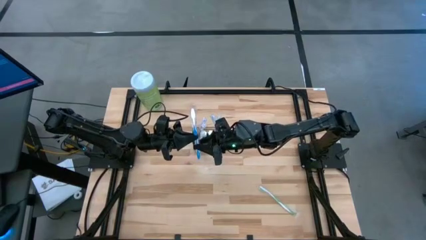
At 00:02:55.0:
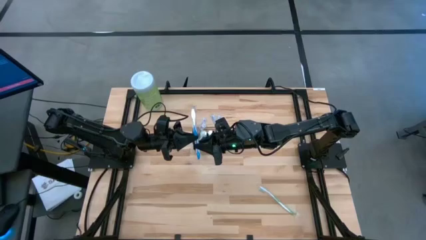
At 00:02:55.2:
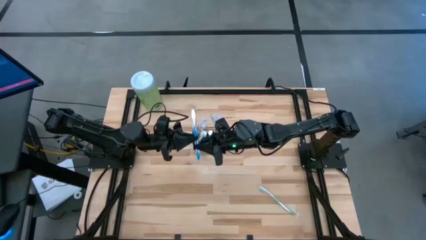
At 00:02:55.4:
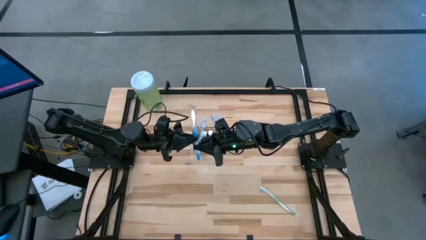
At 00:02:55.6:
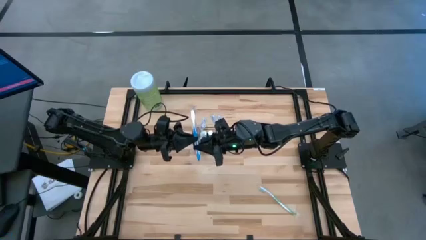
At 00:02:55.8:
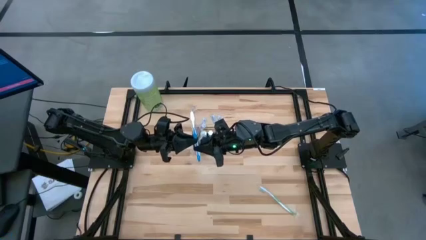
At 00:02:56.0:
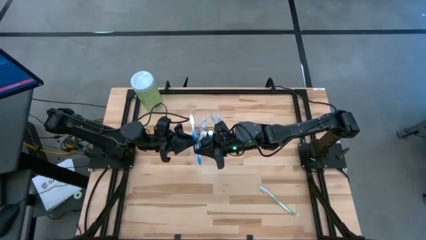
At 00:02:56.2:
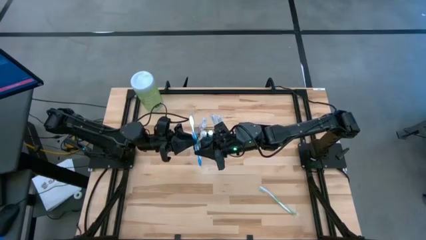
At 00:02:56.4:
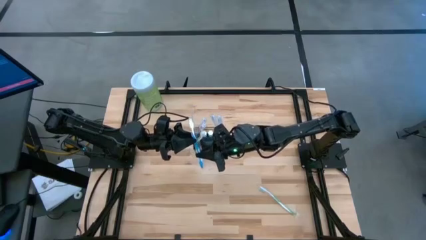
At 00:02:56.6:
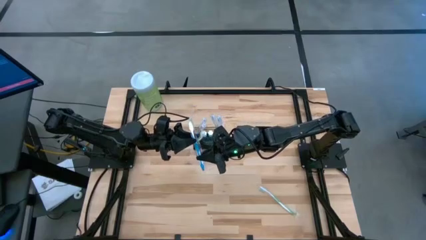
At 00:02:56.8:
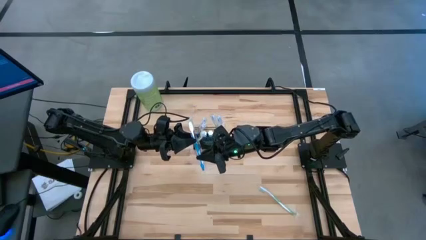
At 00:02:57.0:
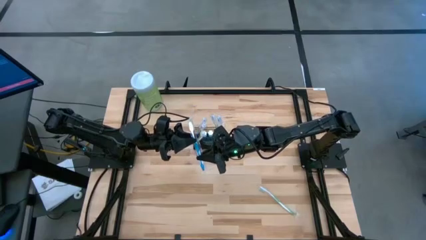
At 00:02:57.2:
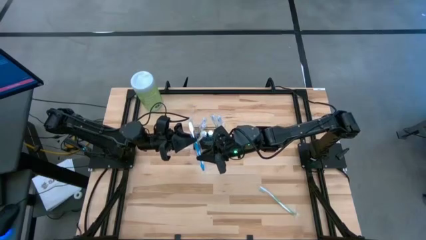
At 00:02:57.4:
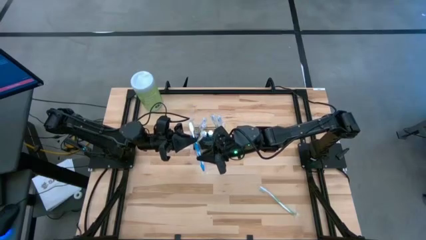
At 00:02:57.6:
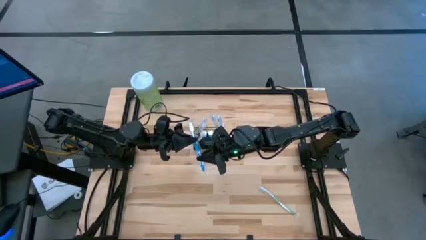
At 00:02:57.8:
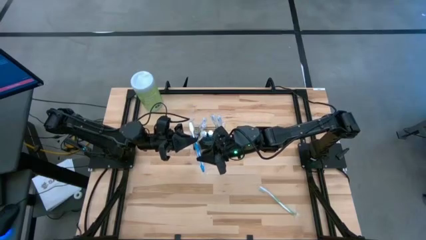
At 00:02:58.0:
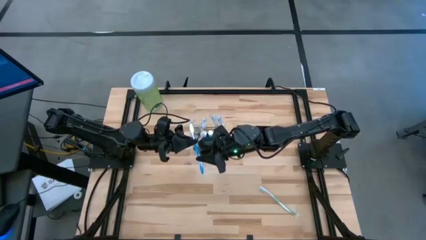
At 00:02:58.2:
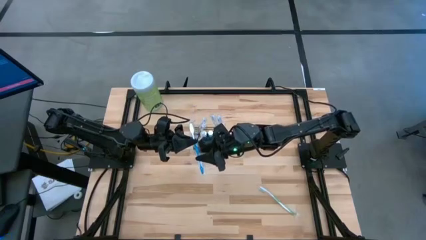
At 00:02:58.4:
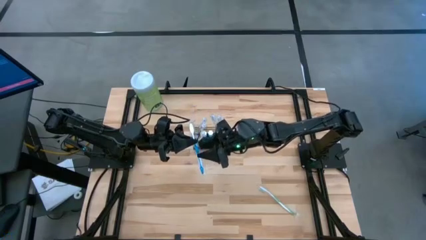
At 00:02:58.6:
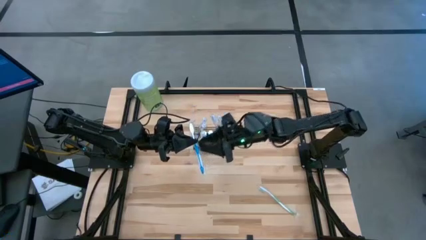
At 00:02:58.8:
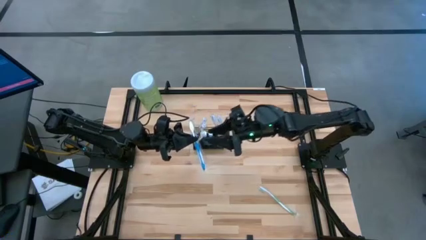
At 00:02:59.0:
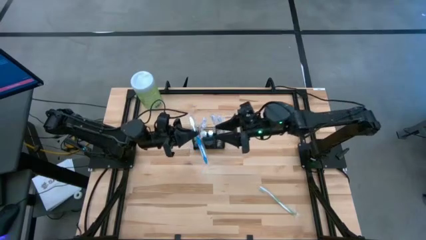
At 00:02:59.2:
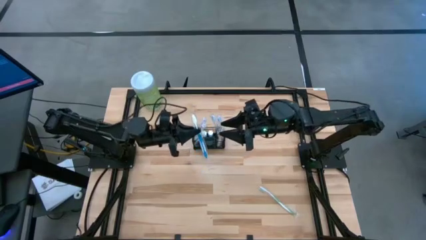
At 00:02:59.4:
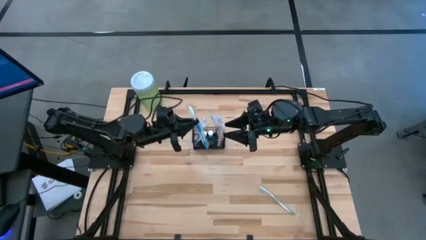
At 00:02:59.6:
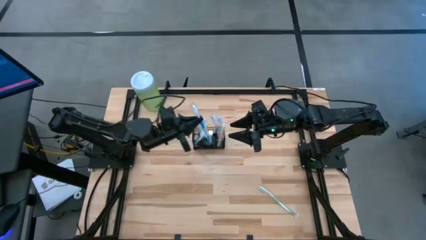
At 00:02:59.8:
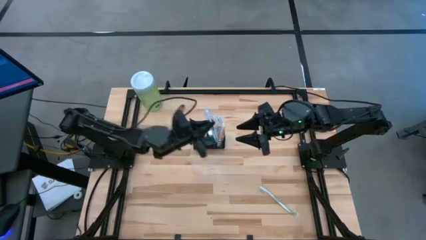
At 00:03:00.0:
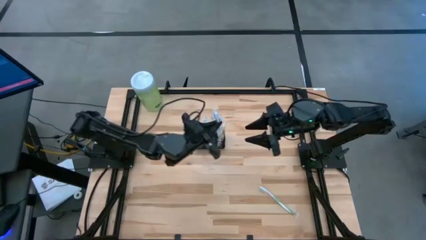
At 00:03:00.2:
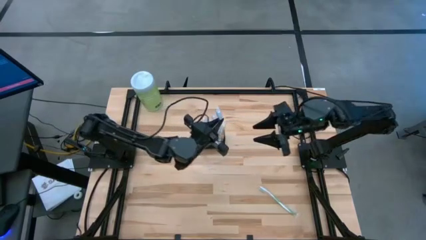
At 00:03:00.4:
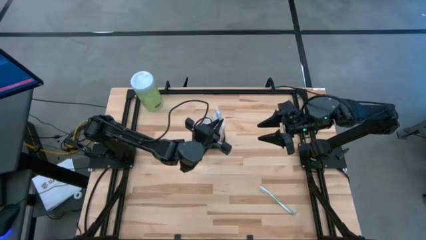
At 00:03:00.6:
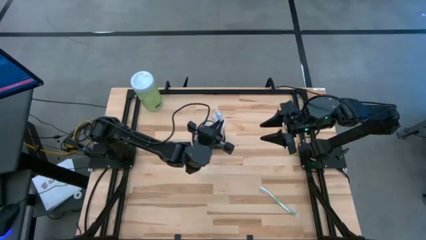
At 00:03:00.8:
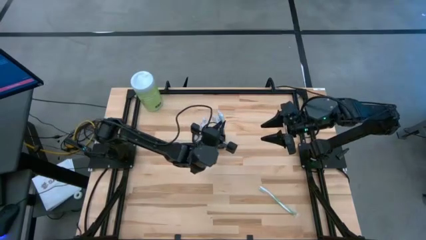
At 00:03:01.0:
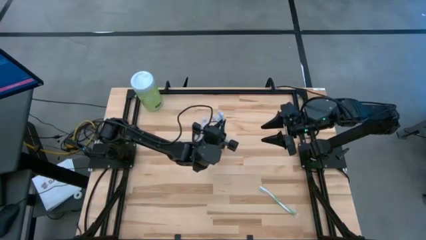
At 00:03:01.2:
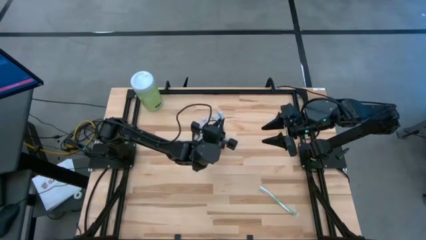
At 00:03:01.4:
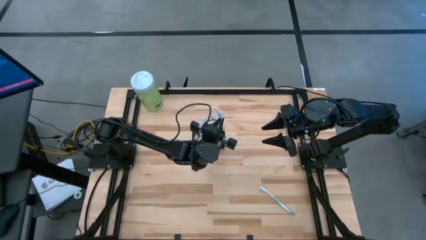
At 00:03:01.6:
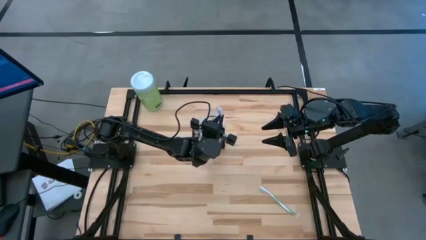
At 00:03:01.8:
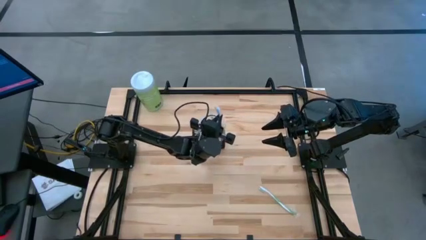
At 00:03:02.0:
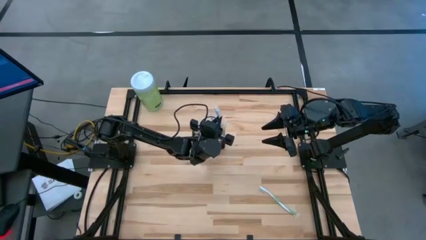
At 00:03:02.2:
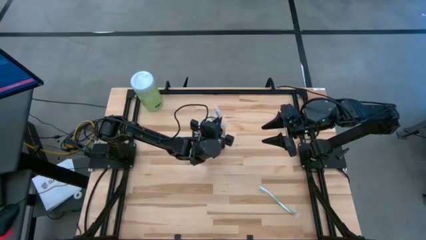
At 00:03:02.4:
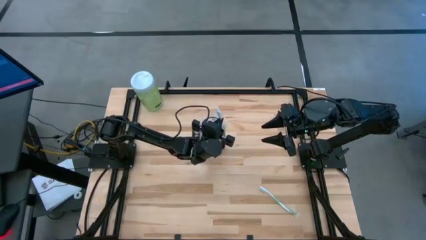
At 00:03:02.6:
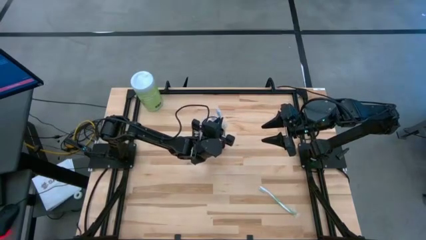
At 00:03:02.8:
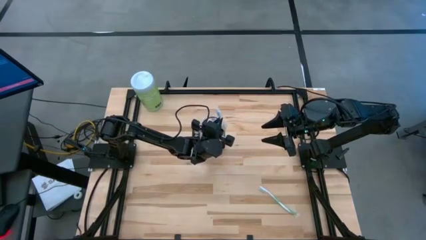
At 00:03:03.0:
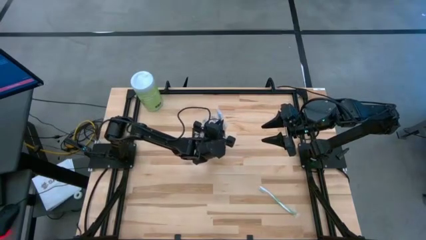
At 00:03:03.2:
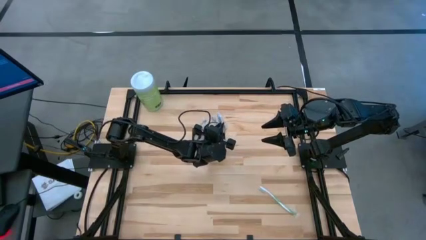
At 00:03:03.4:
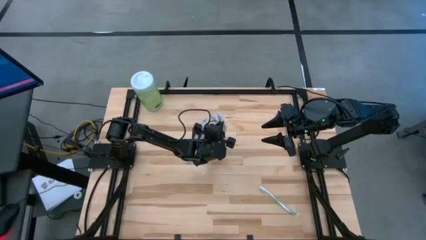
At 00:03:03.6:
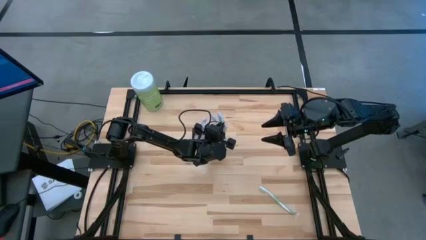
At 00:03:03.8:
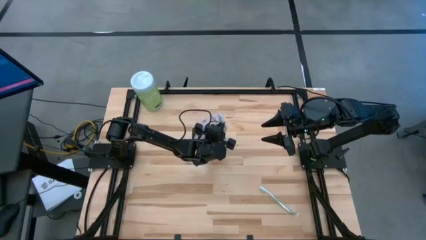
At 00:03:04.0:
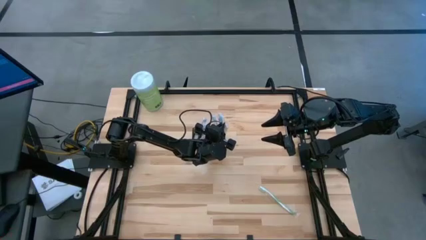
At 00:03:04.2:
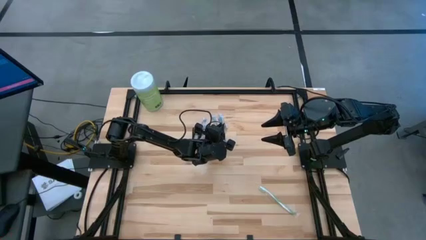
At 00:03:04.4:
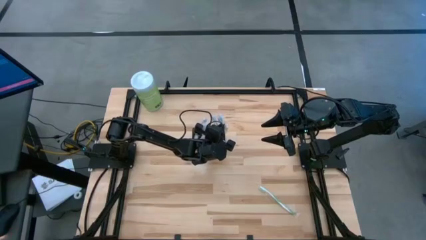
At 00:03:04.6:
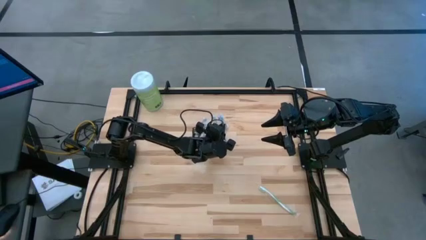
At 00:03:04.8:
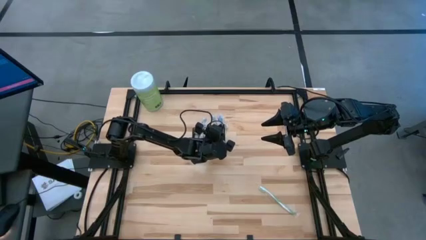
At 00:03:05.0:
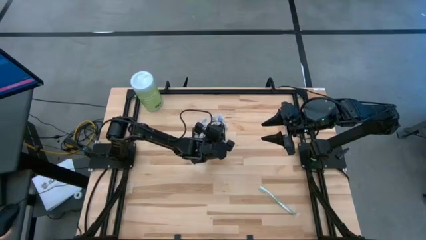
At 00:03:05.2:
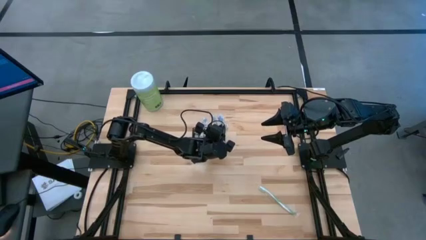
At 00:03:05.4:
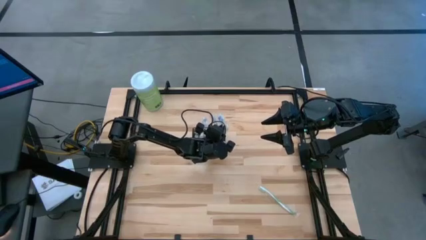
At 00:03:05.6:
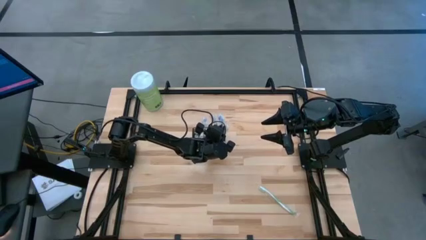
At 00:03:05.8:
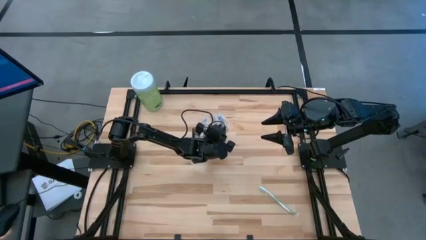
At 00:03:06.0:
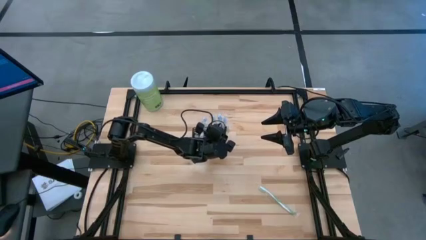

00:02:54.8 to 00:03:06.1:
Task: Pick & Place toothbrushing station
Put the blue toothbrush into the black mesh organizer

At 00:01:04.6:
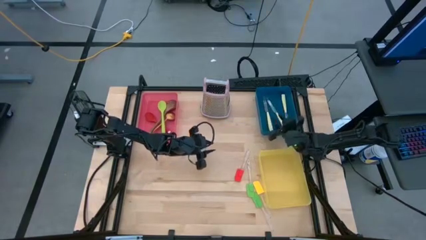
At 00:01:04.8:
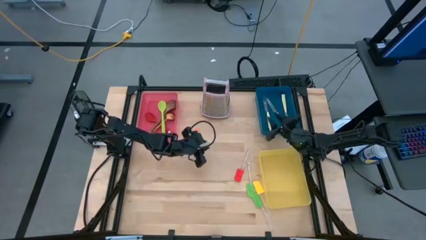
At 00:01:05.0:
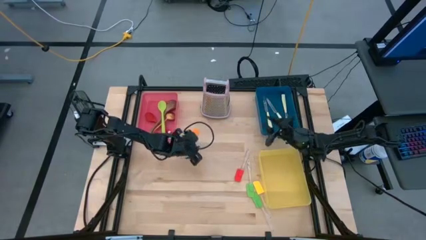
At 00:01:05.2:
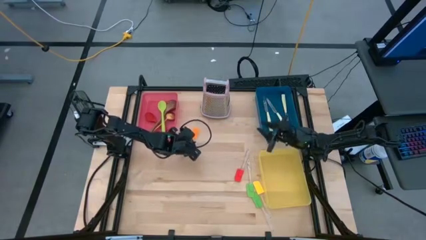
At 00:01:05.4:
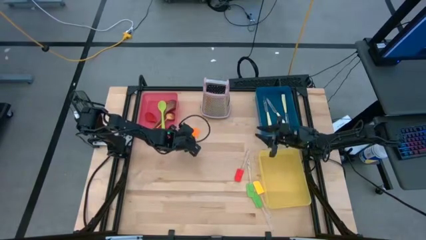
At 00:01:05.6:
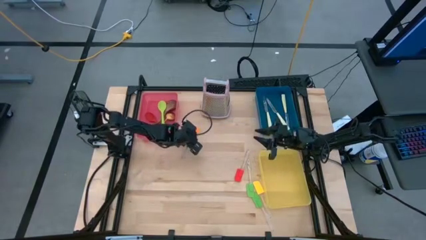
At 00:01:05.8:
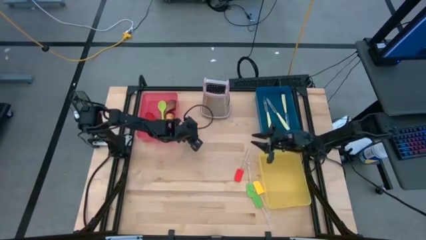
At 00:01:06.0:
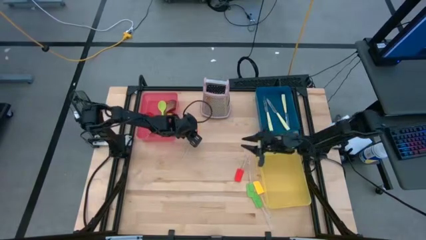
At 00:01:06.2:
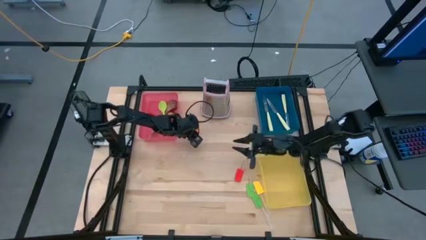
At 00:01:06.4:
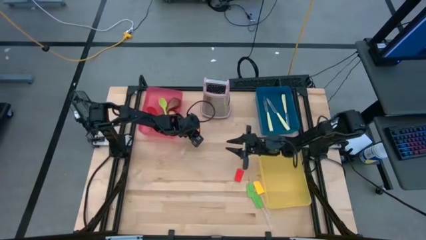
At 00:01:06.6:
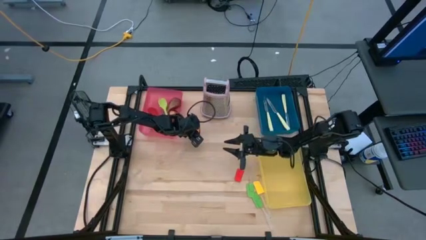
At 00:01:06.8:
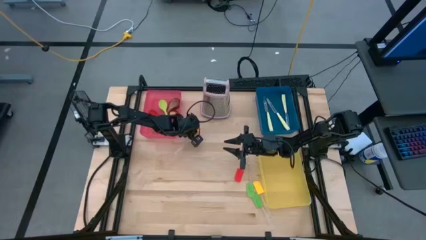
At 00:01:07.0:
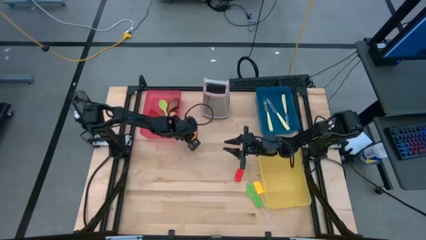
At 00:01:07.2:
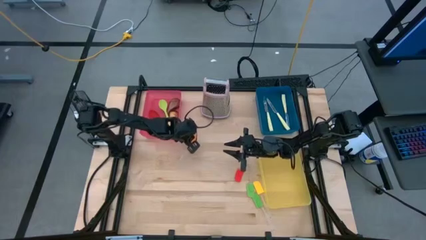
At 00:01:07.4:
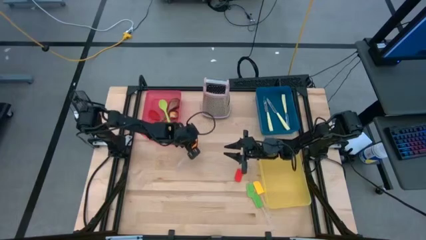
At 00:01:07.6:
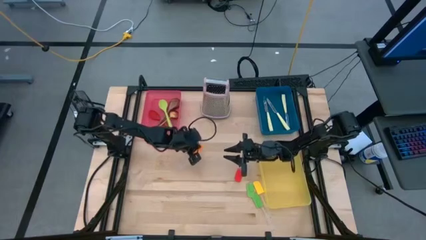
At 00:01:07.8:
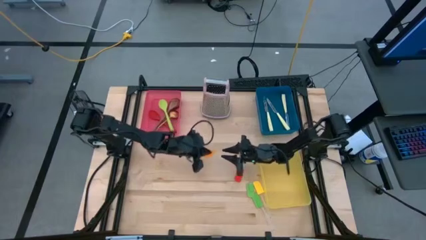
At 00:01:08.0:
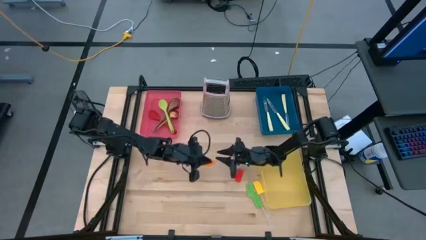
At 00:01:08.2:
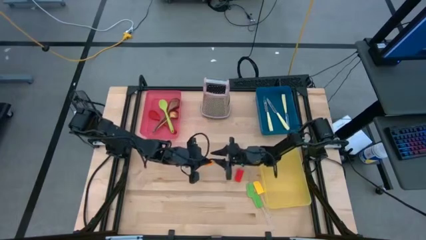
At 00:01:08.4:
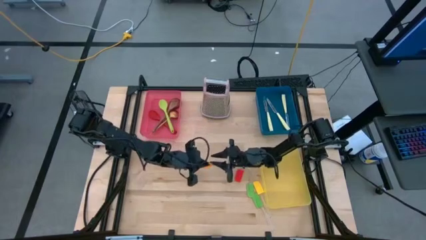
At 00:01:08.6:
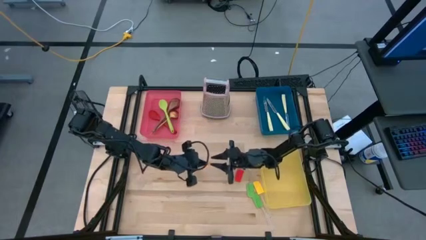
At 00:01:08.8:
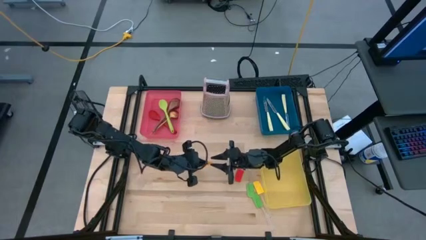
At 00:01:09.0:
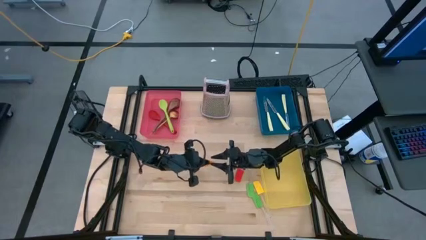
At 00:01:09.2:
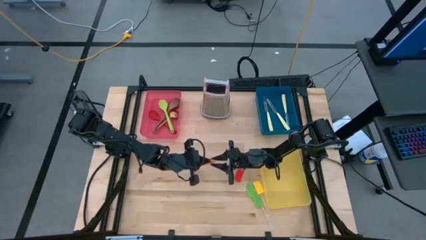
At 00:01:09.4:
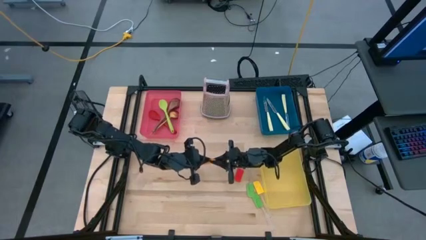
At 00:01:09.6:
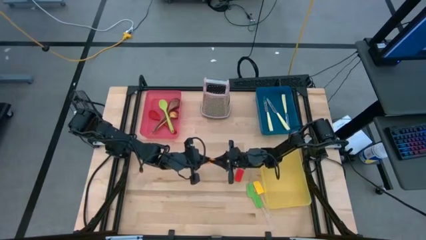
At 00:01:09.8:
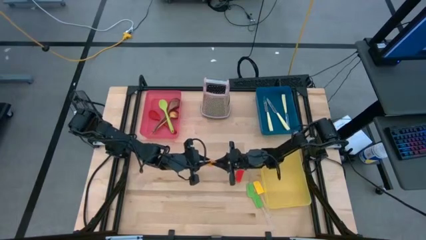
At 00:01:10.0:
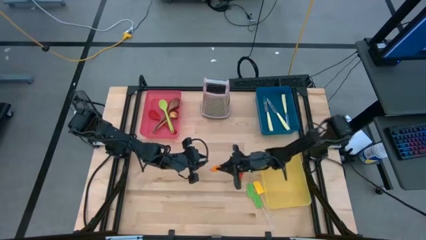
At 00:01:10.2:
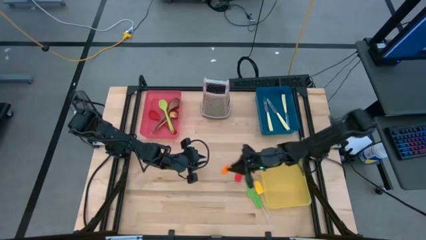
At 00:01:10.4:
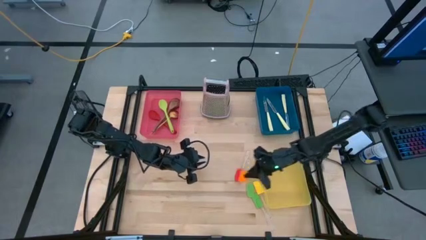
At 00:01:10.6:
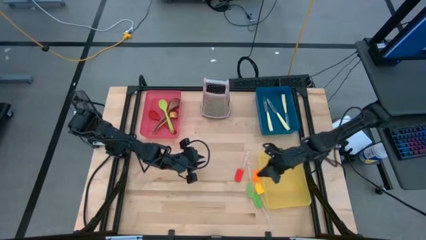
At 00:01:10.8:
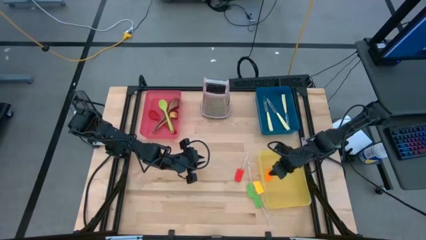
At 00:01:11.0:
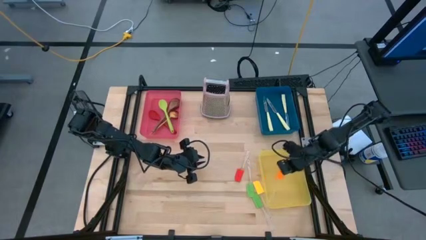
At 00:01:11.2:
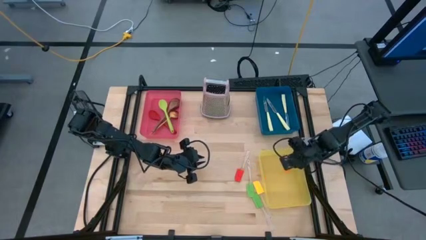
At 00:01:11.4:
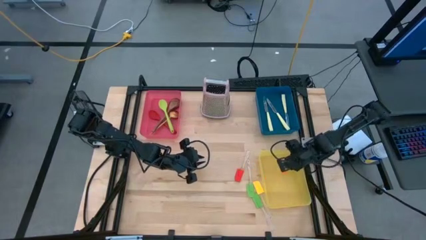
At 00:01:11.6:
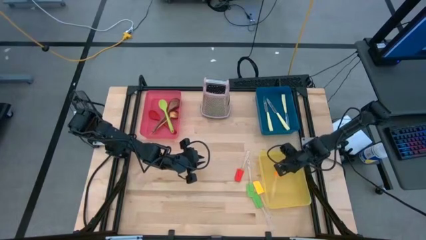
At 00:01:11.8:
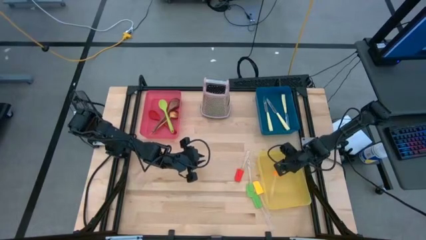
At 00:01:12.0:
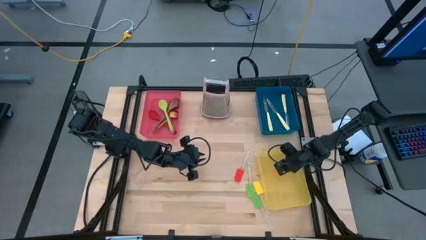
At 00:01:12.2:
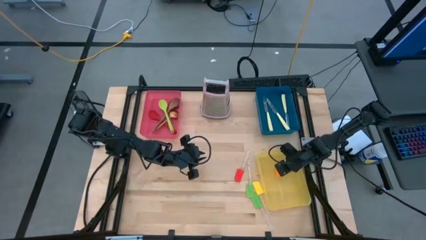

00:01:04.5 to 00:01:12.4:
Task: Pick & Place Kitchen Items
Put the orange spatula into the yellow bin
